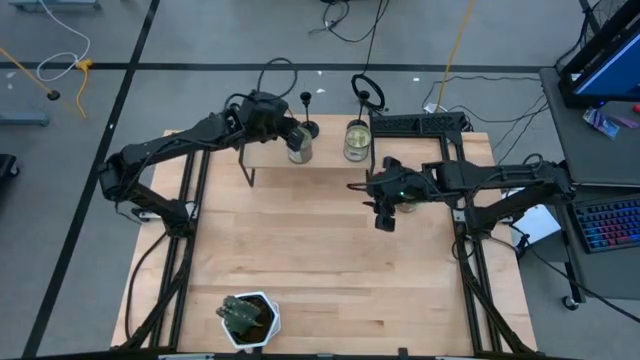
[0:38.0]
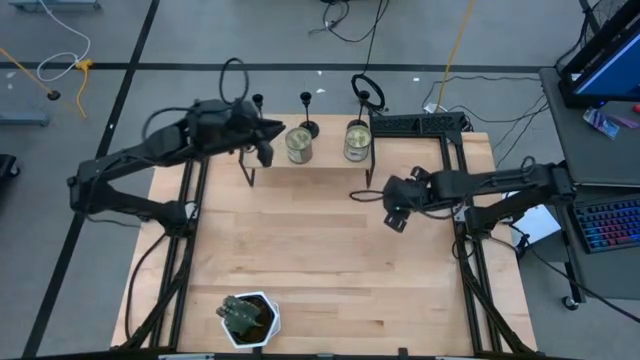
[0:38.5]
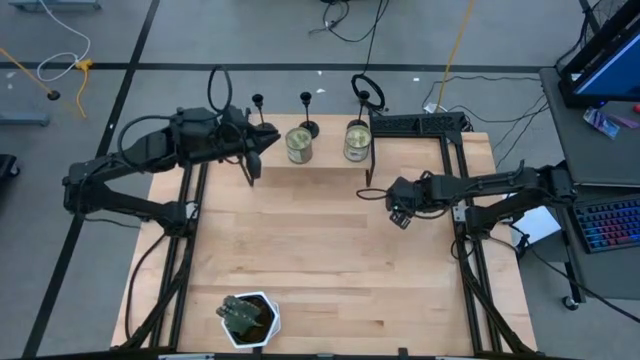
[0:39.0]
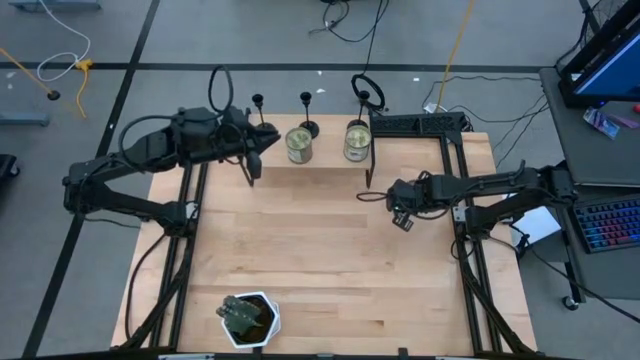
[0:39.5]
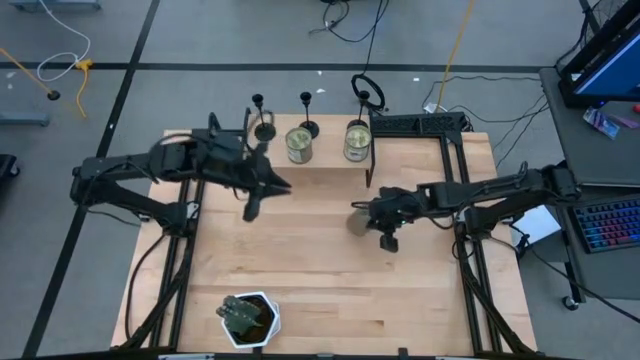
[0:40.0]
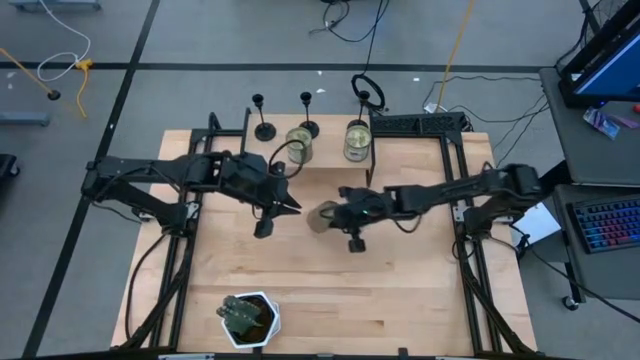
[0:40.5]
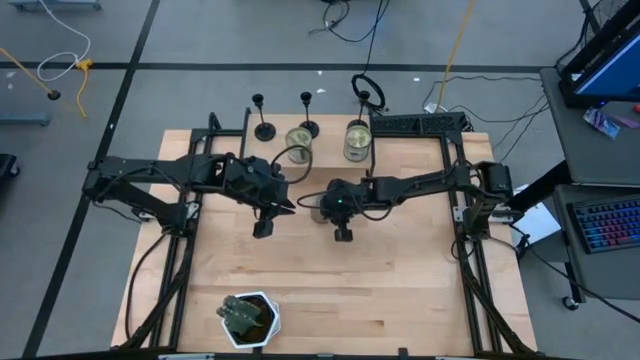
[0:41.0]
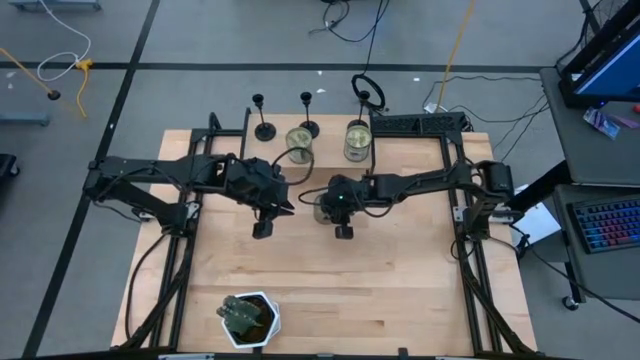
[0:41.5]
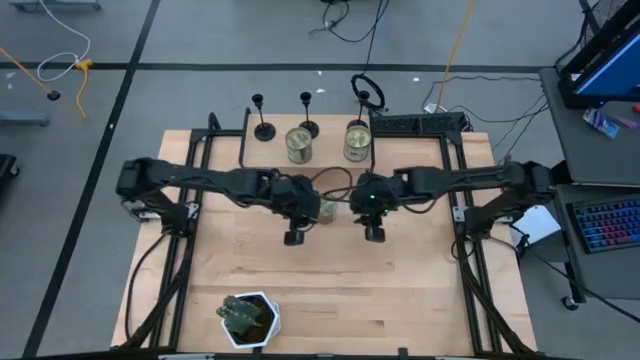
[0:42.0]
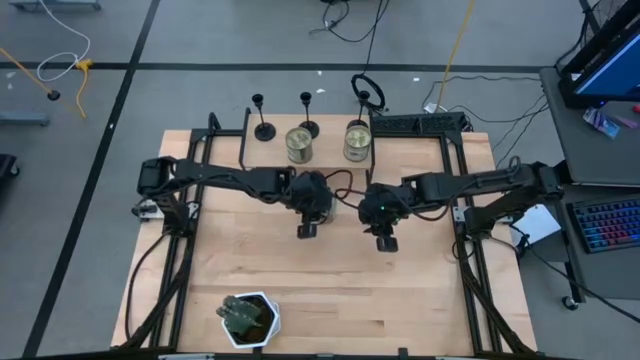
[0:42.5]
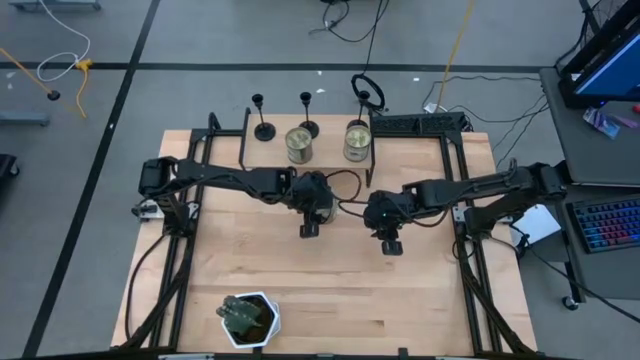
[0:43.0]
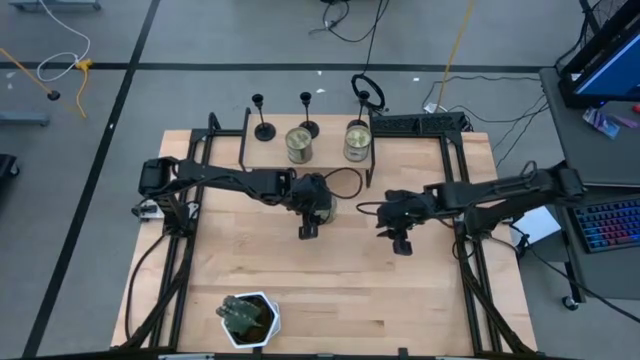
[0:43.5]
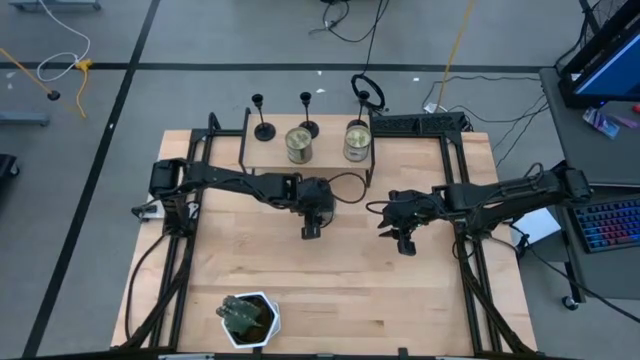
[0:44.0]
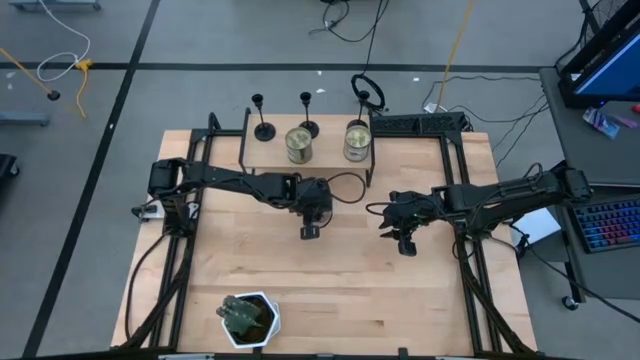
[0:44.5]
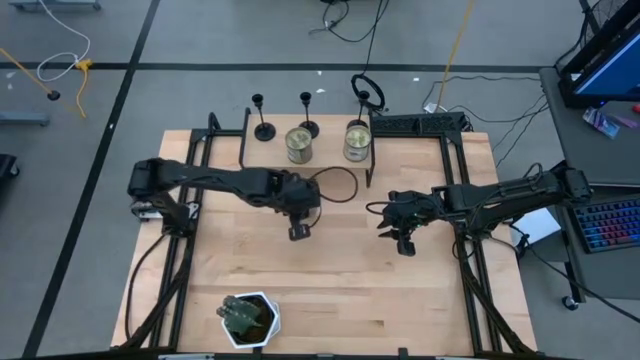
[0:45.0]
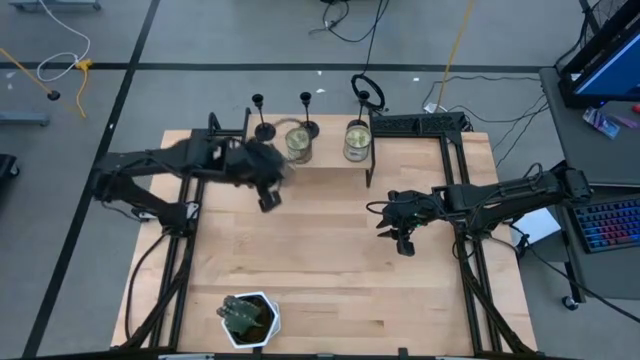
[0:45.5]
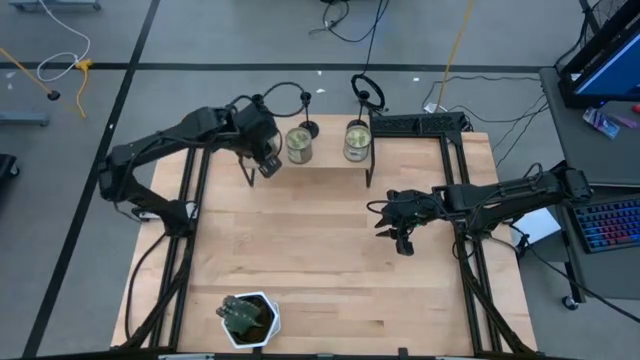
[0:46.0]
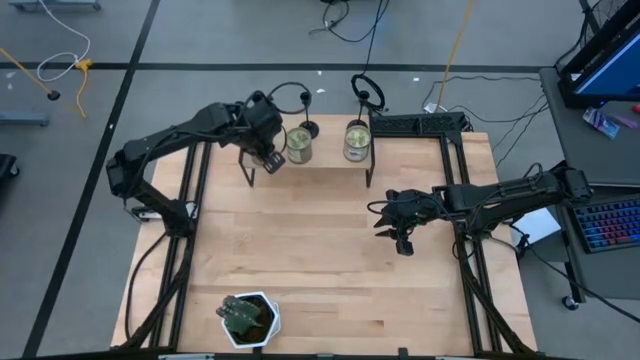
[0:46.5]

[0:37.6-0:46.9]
Task: Pick & Place candle stick holders
Put the scented candle on the shelf

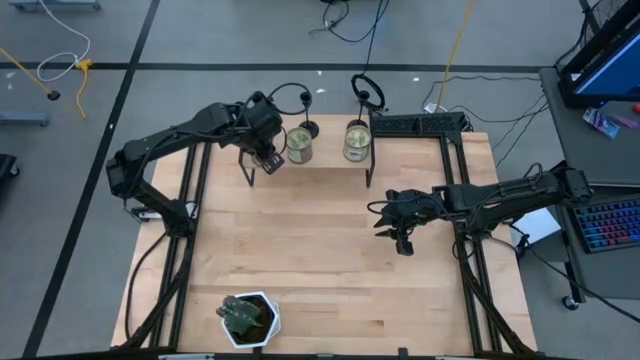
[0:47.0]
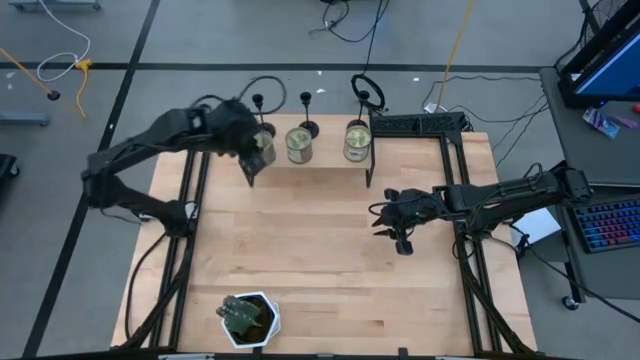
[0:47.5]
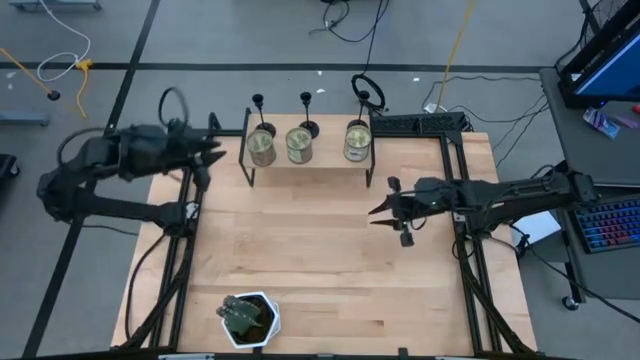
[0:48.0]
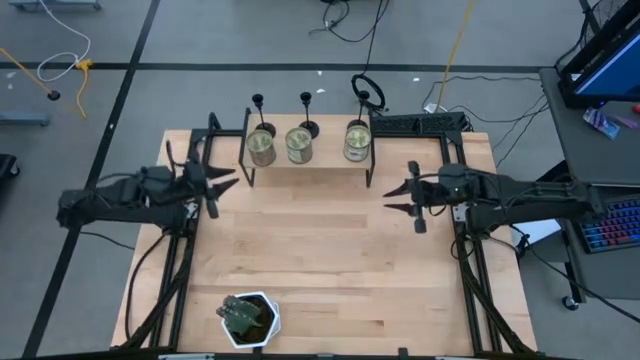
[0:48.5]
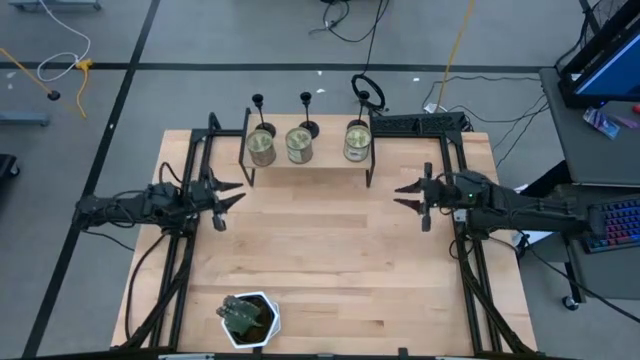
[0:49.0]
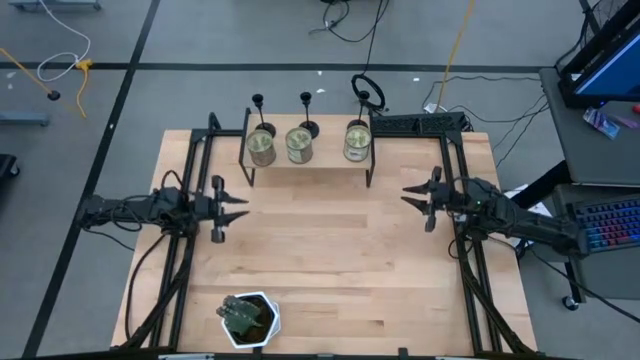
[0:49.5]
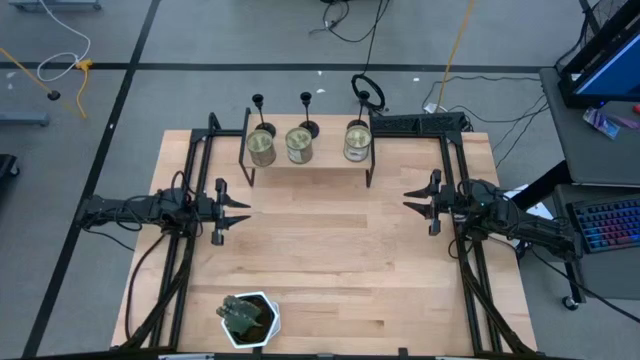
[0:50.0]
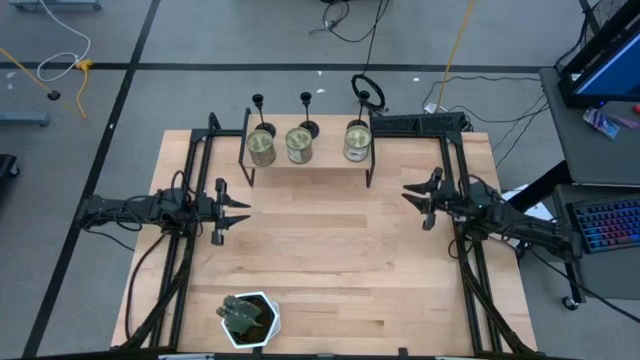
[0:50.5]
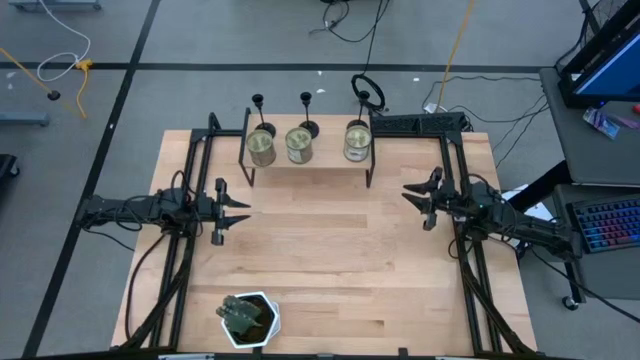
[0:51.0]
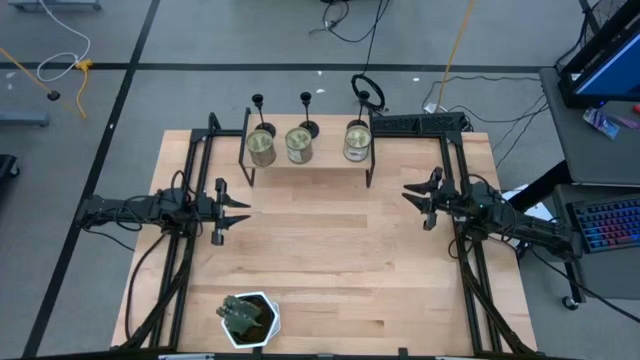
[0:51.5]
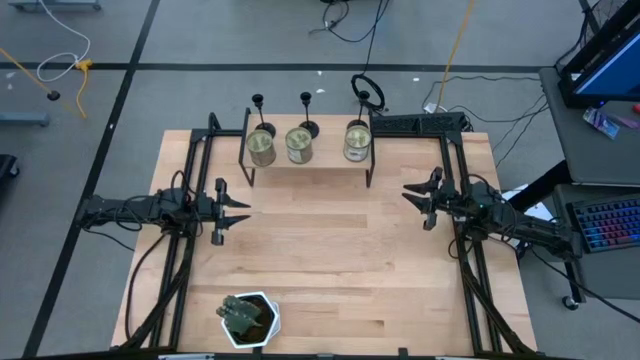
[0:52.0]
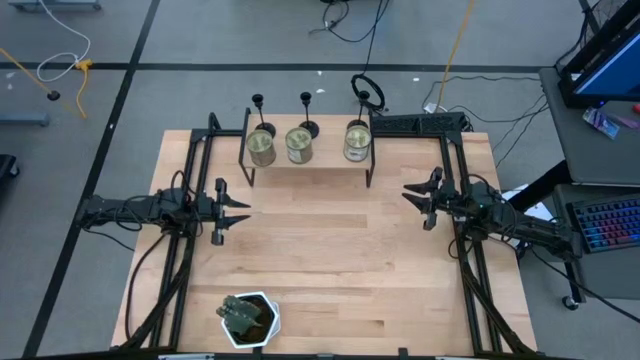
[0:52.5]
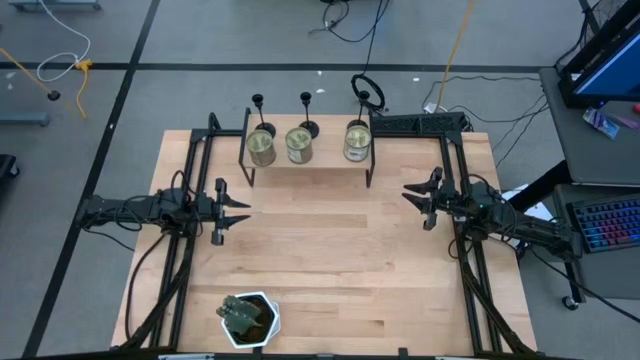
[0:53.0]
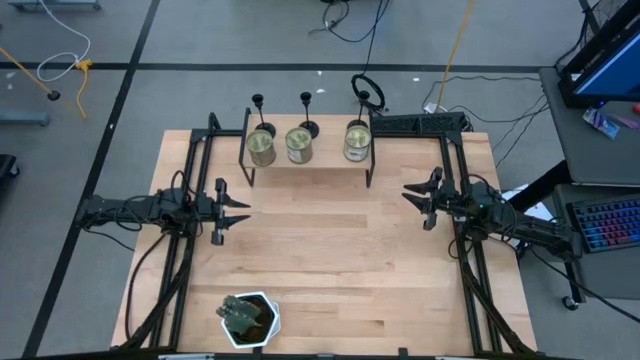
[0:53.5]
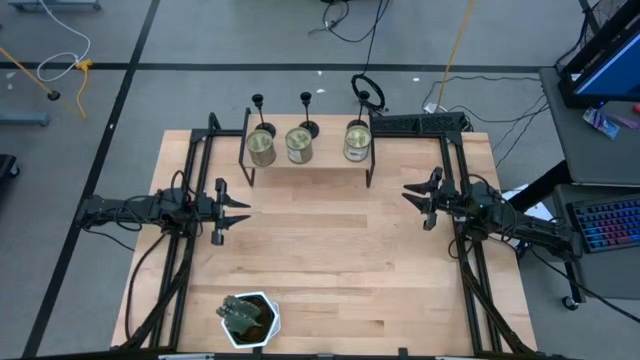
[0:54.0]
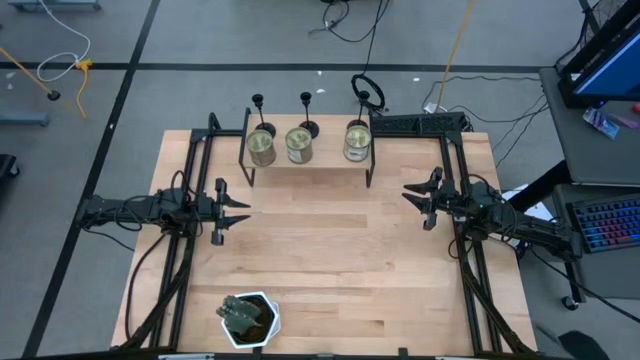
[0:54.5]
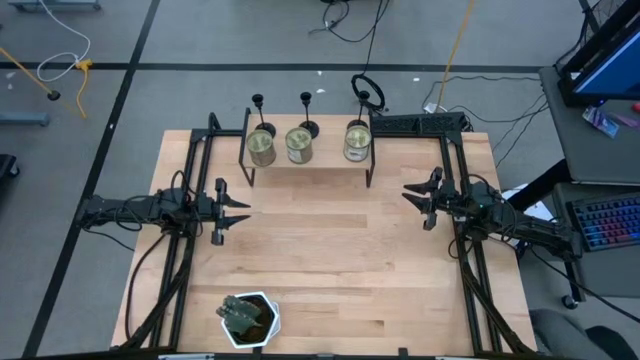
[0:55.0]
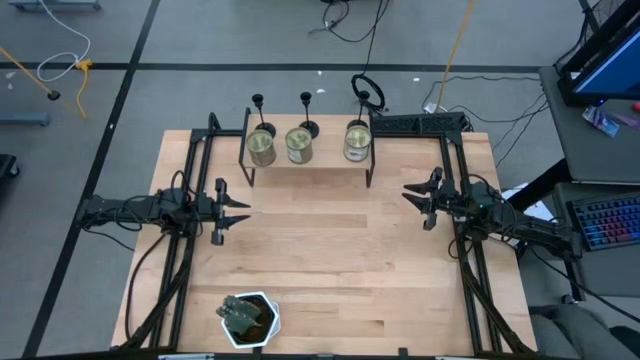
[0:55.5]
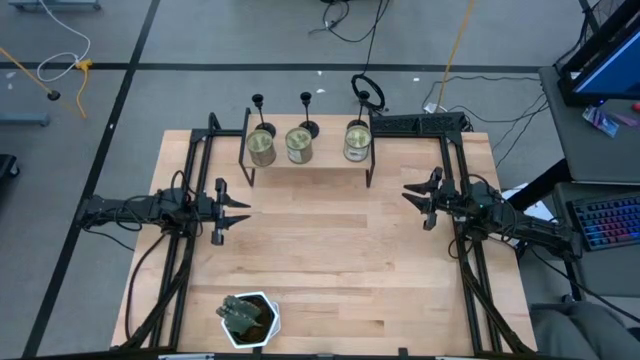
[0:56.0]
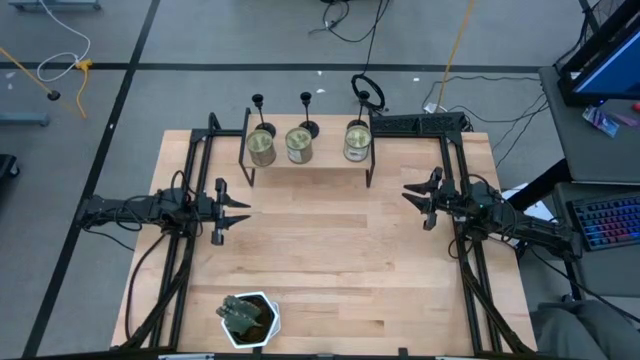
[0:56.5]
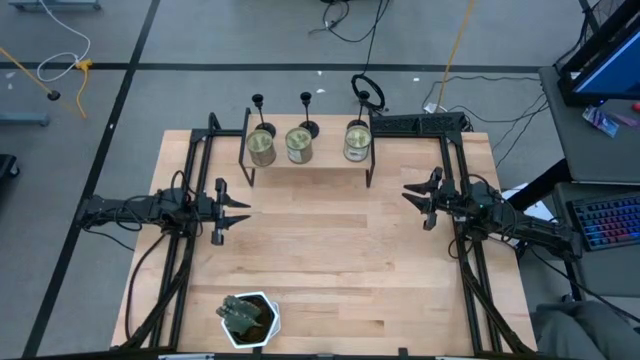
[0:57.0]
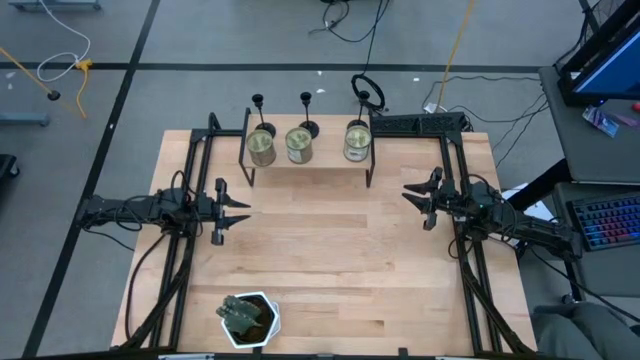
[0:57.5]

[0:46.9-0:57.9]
Return to Home Position

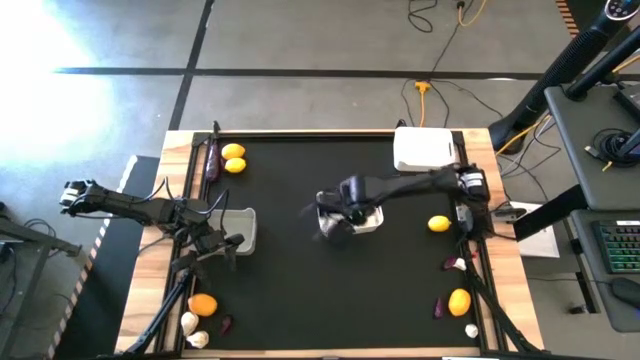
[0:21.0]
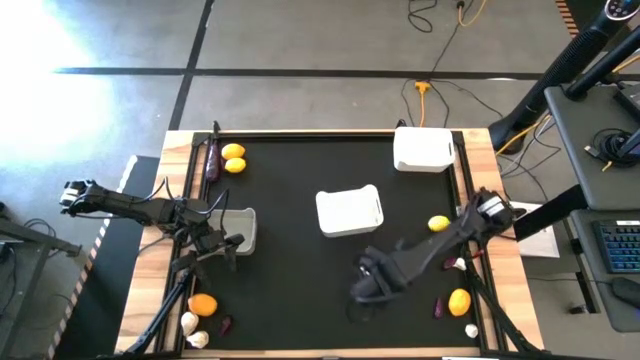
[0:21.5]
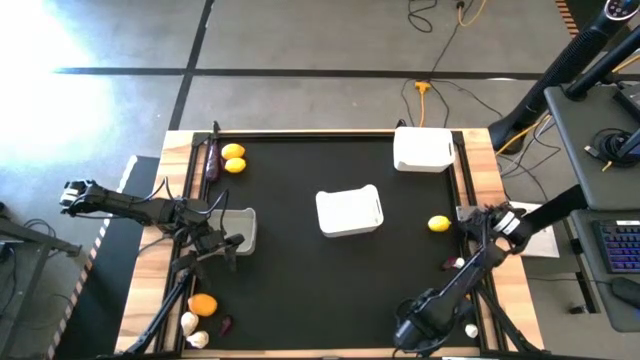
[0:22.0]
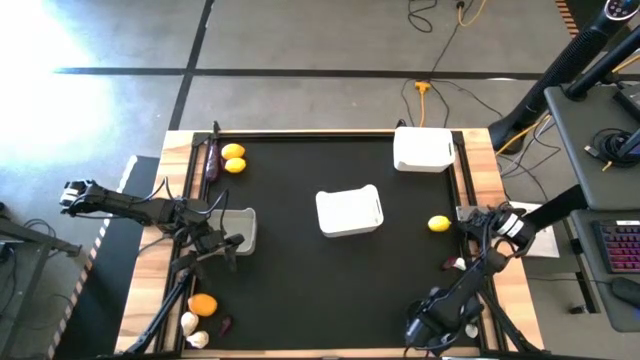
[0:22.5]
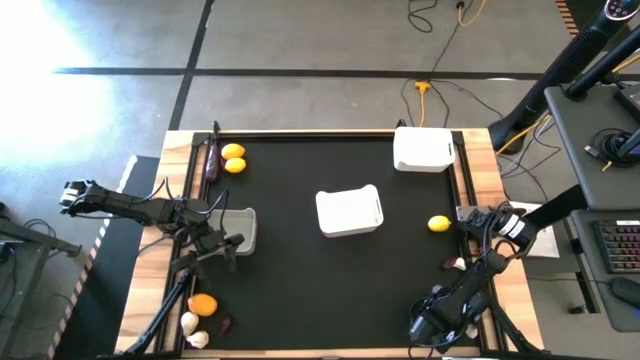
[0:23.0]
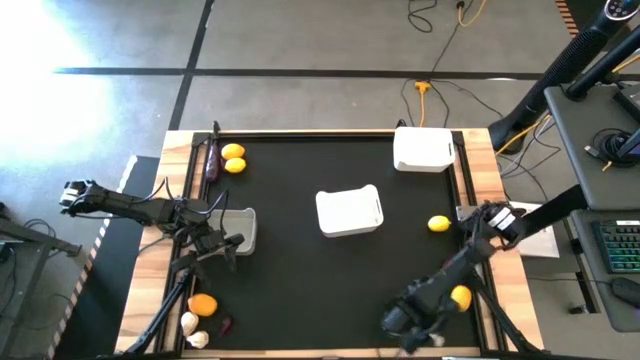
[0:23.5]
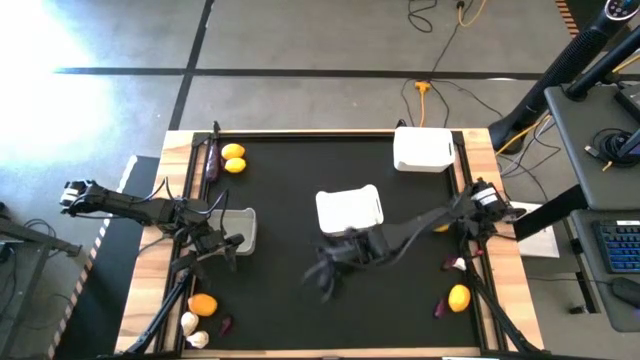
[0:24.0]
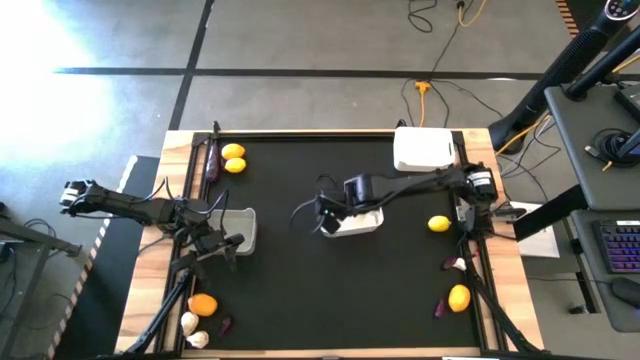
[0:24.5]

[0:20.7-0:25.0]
Task: Sort produce into baskets
Put the white garlic into the bottom white bin
